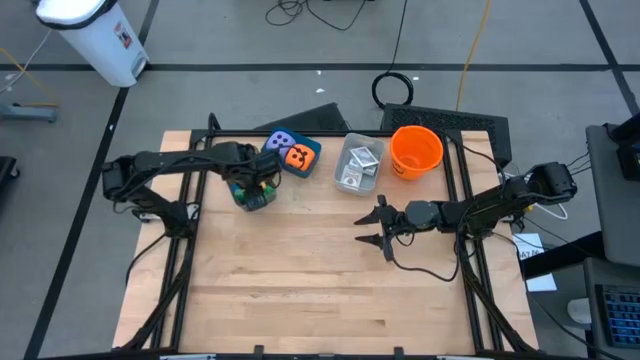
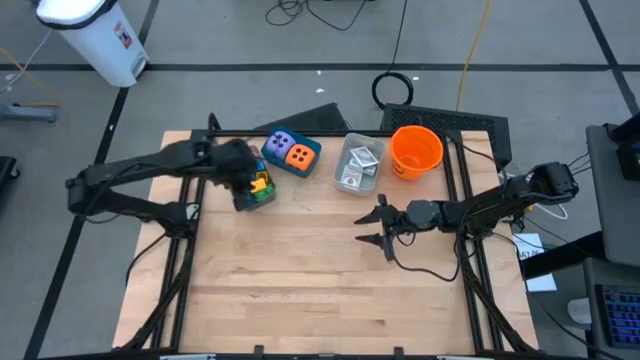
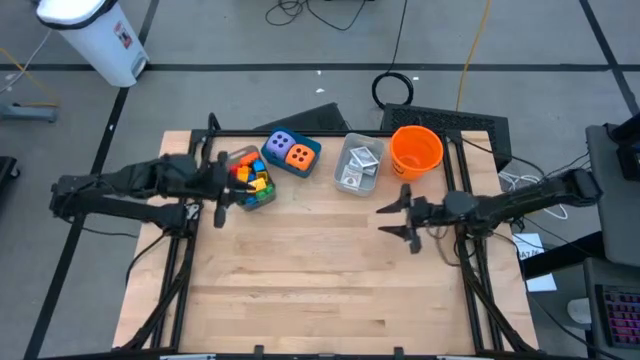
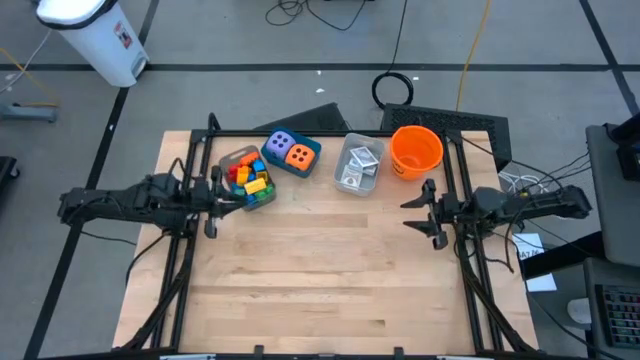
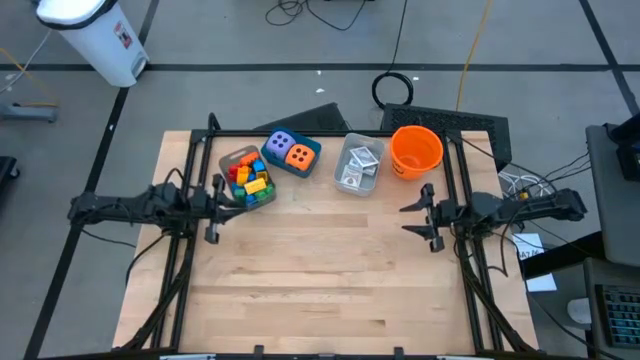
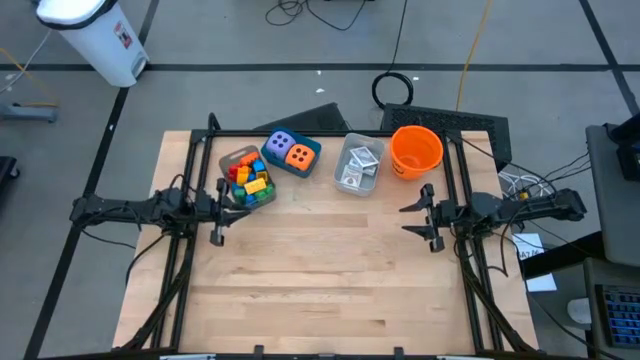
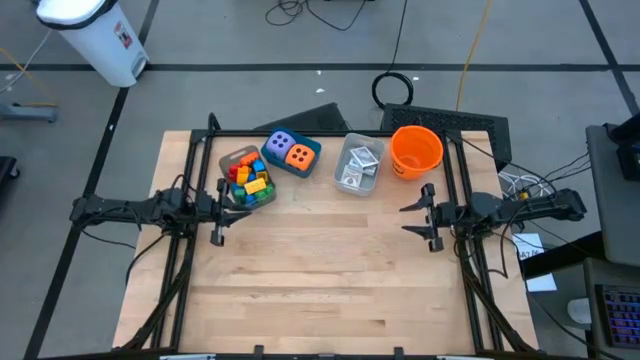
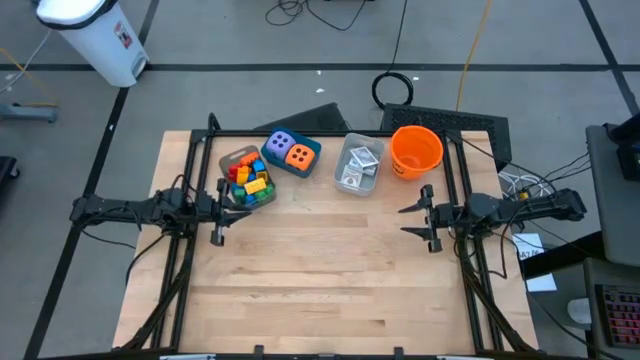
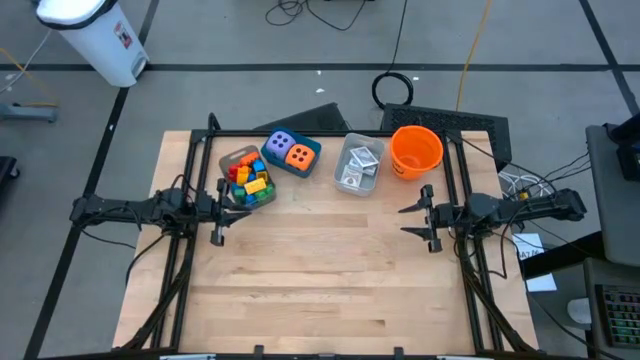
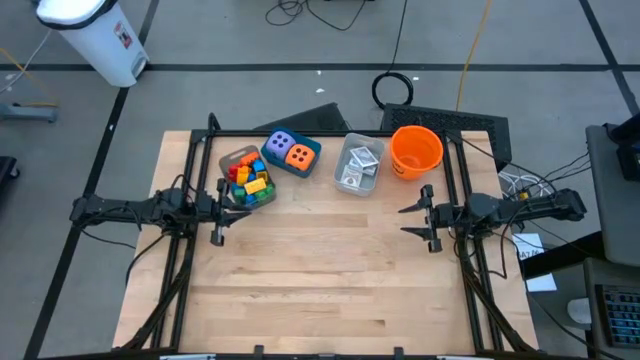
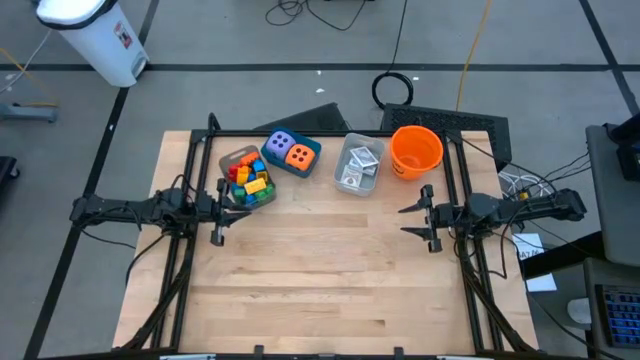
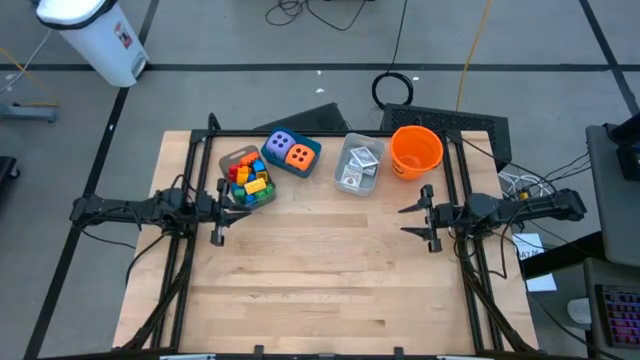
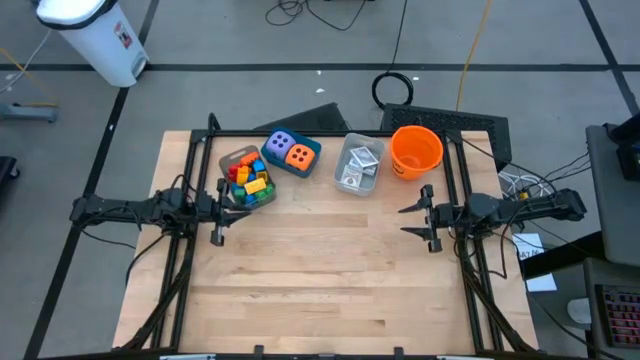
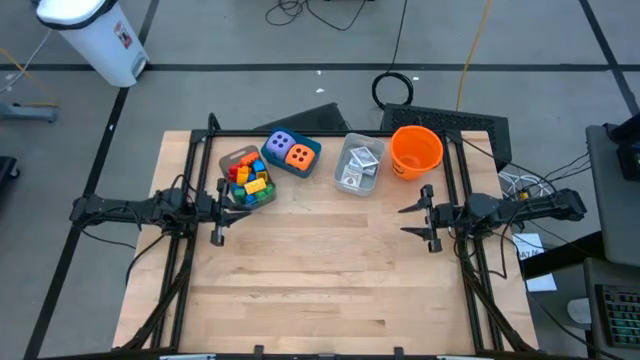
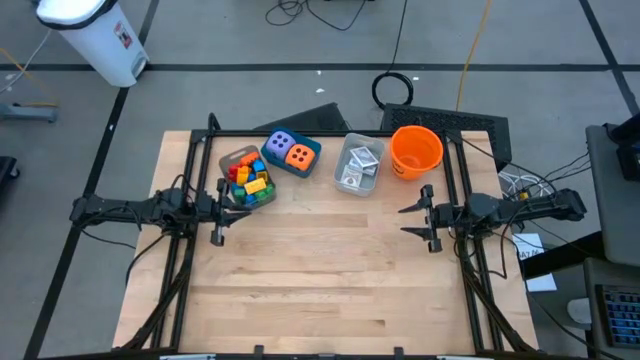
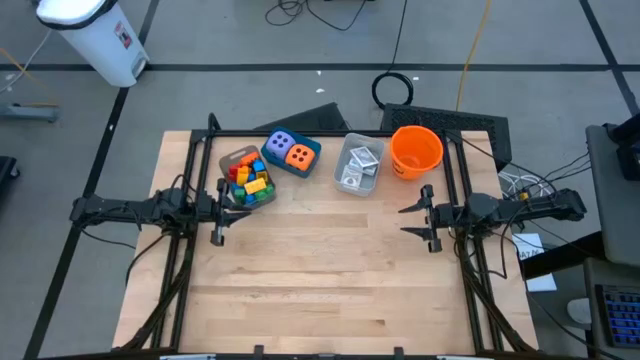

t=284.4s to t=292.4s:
Task: Pick & Place Toys
Return to Home Position

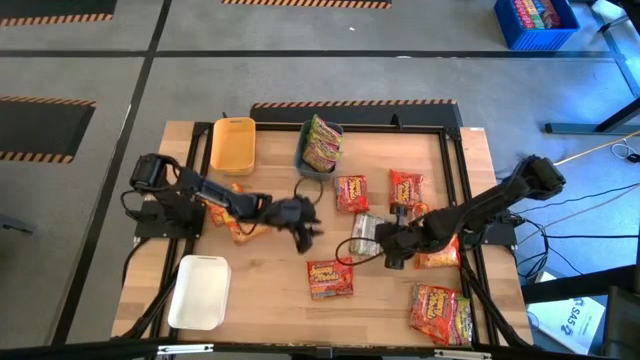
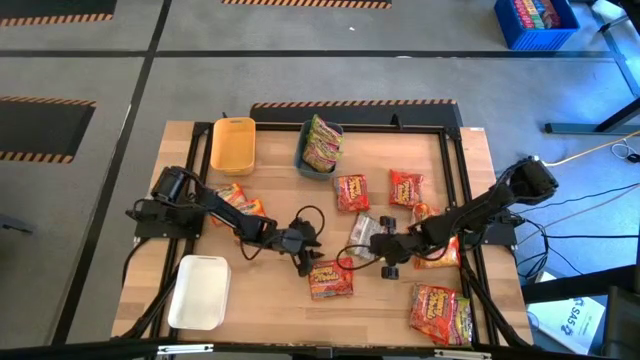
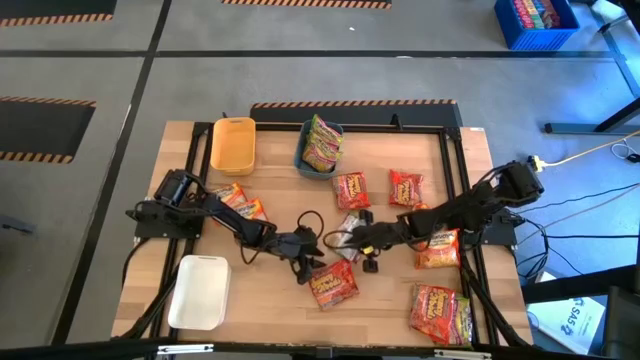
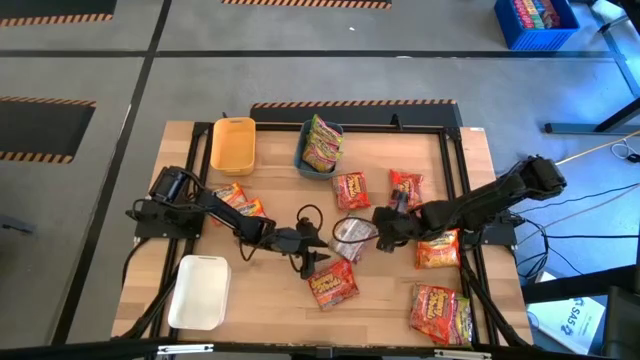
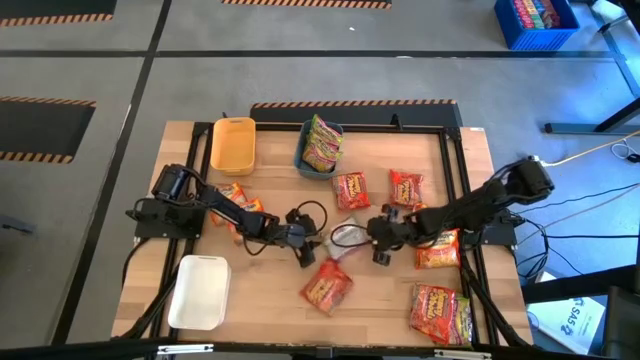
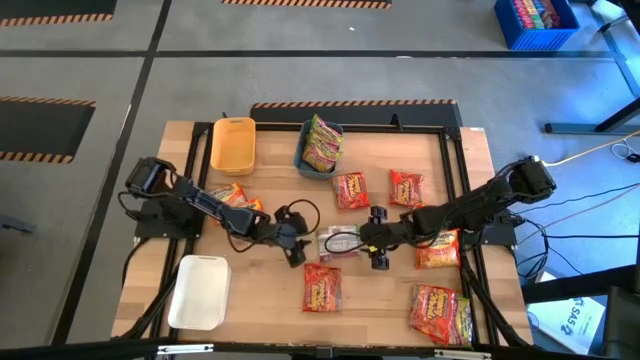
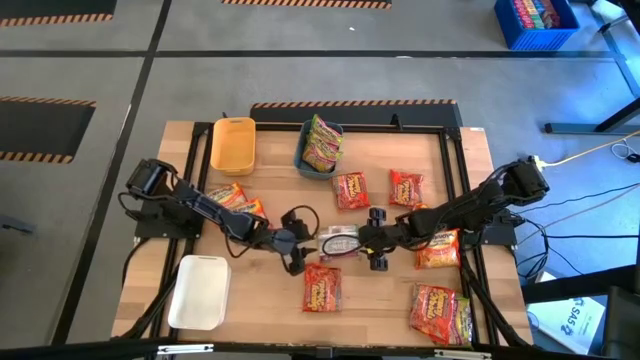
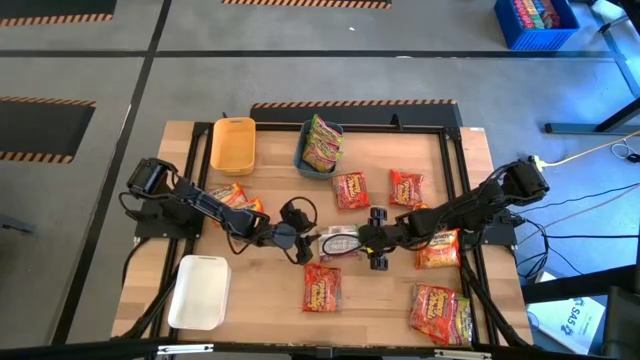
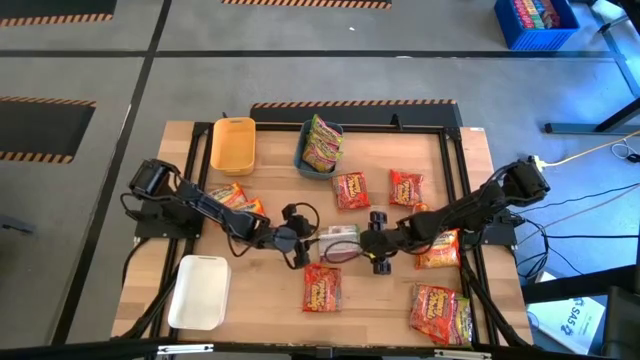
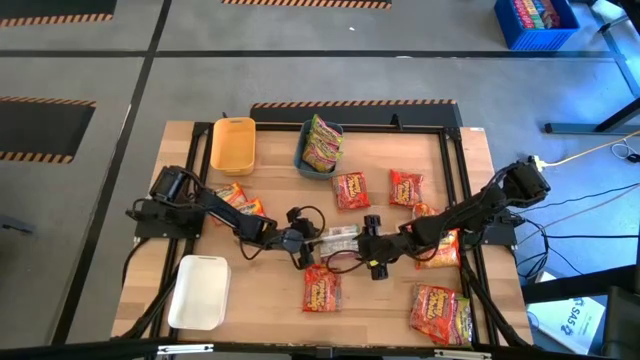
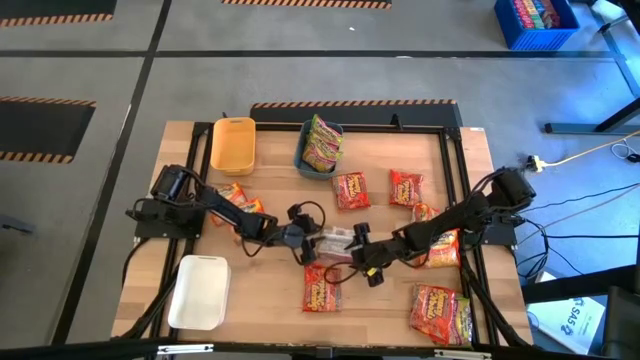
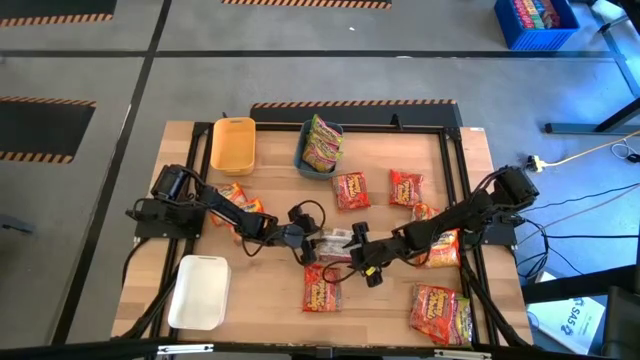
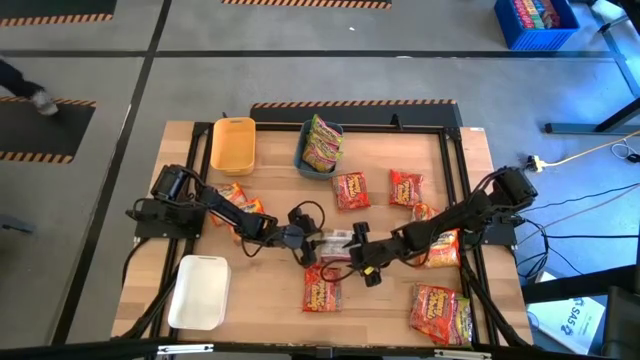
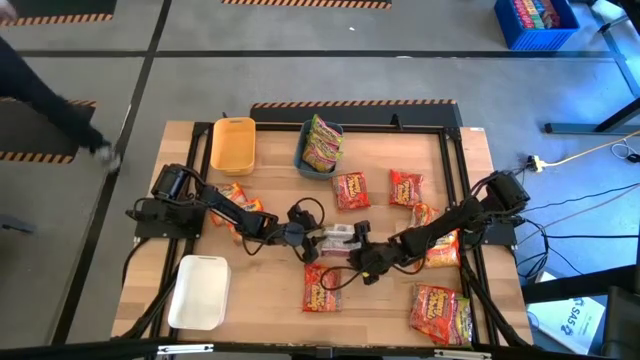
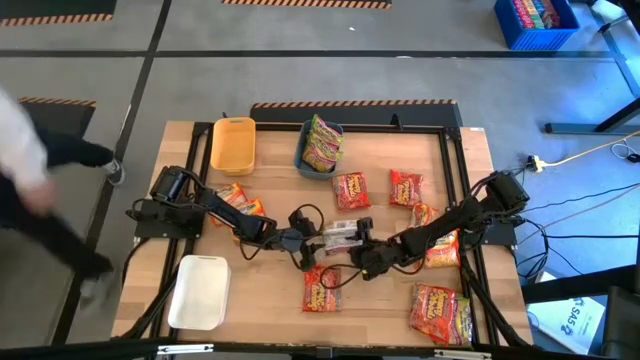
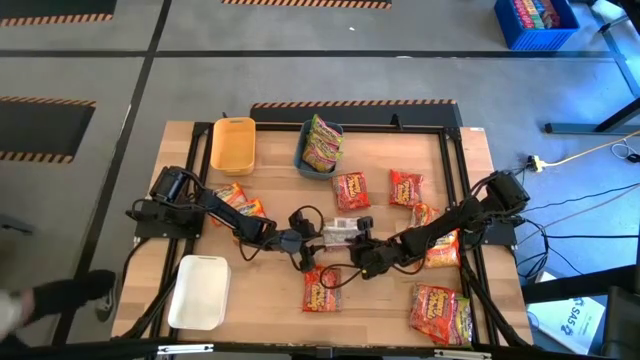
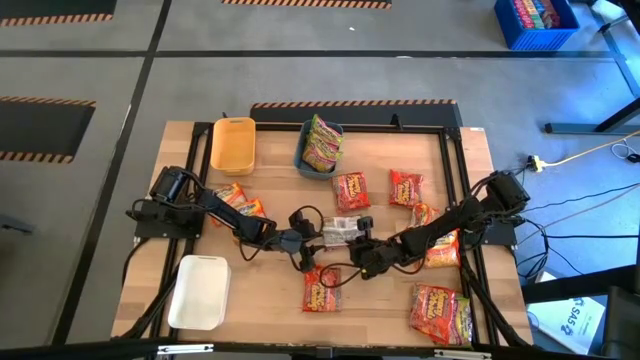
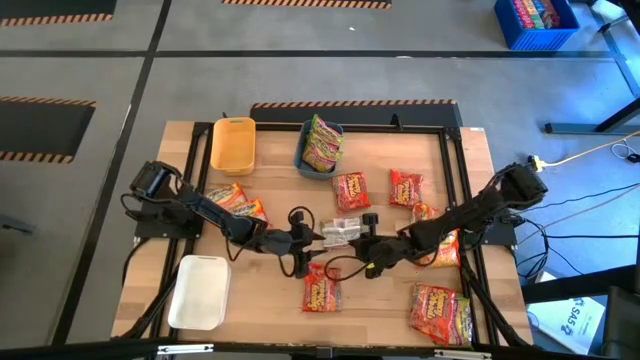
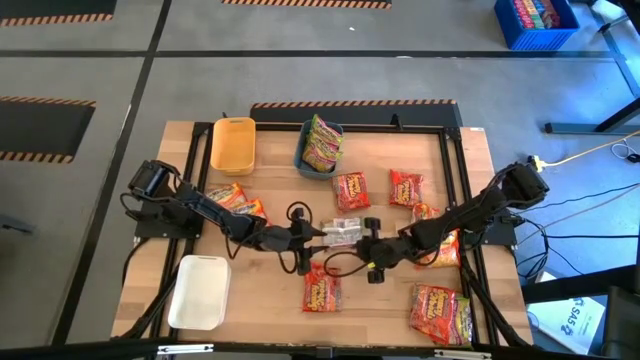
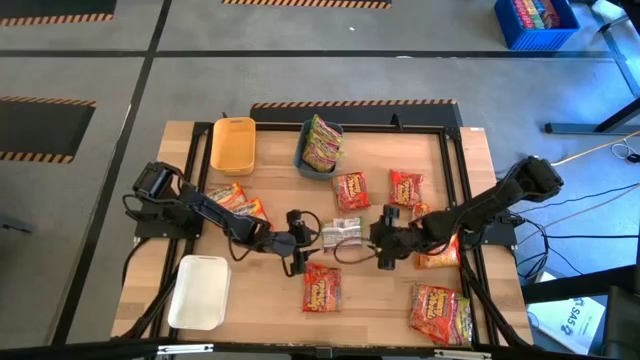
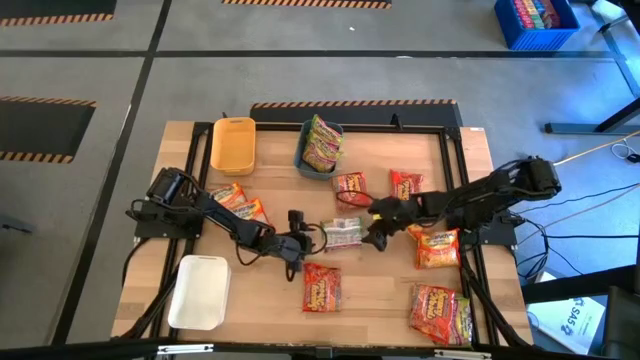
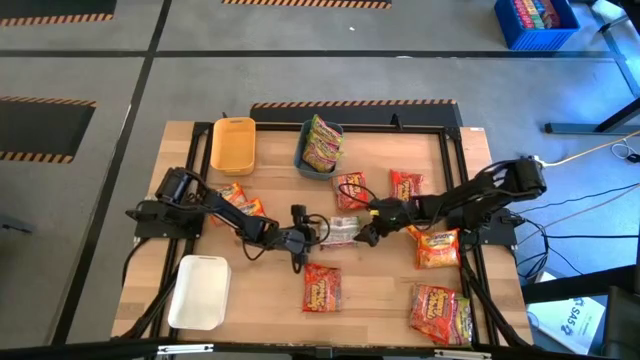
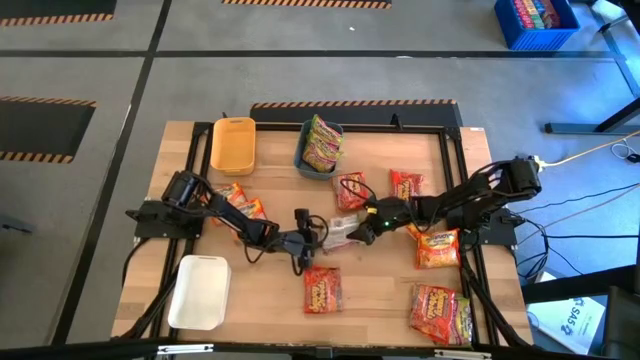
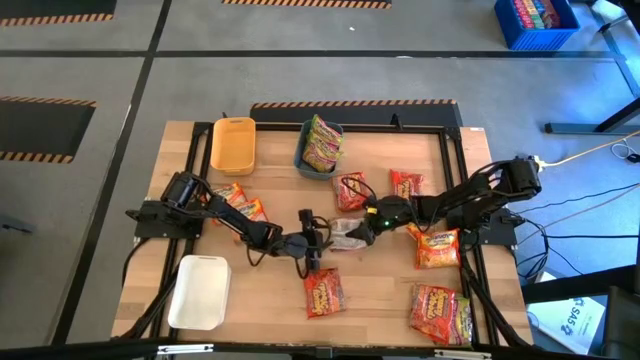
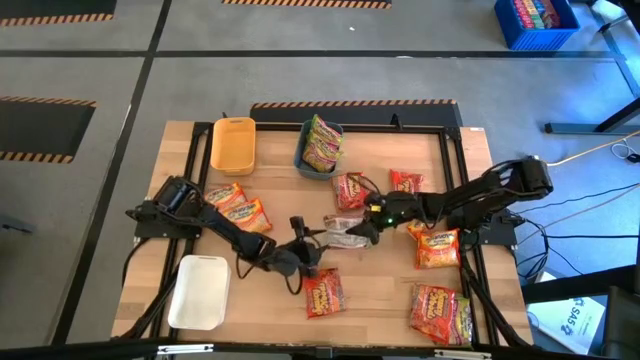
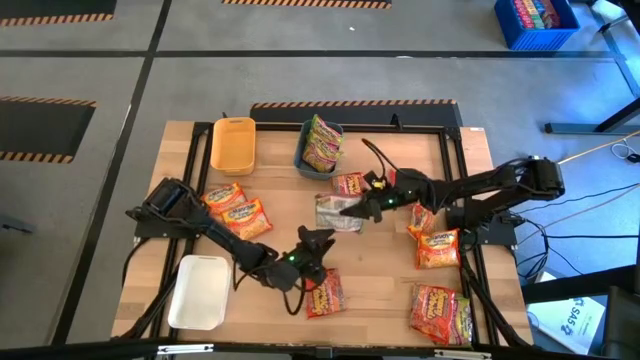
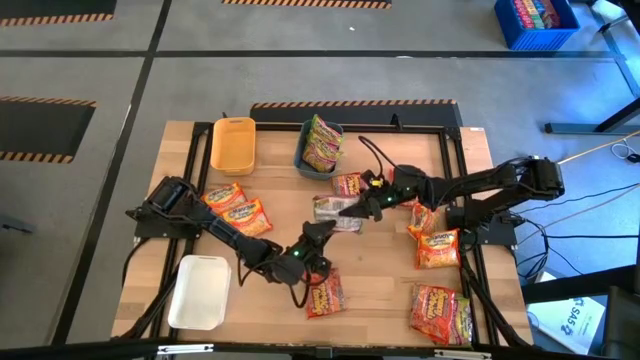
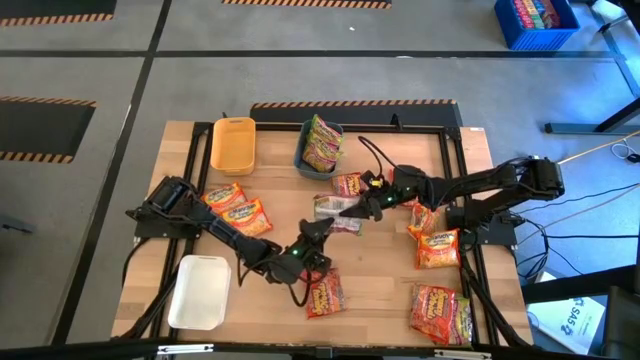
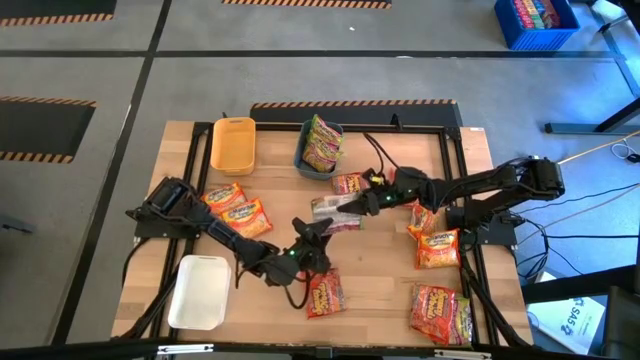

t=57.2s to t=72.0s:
Task: Sort Maruchan noodles
Put the green noodle pack into the blue bin
